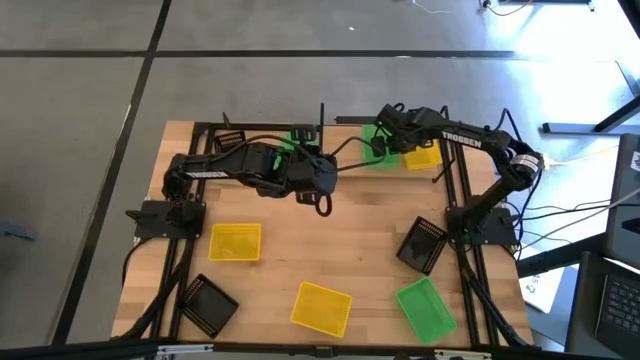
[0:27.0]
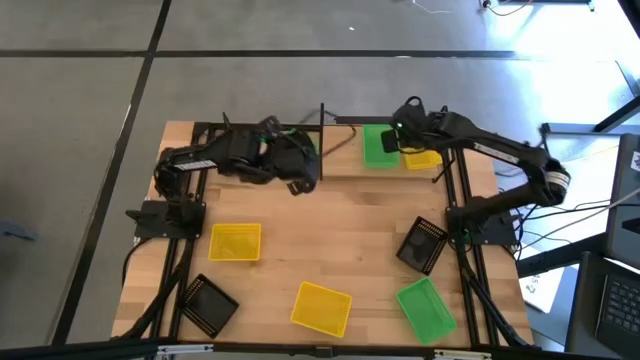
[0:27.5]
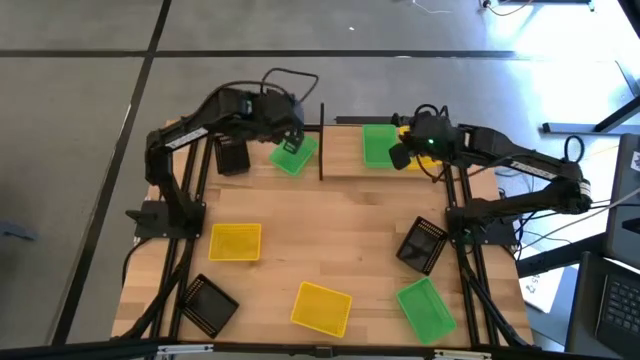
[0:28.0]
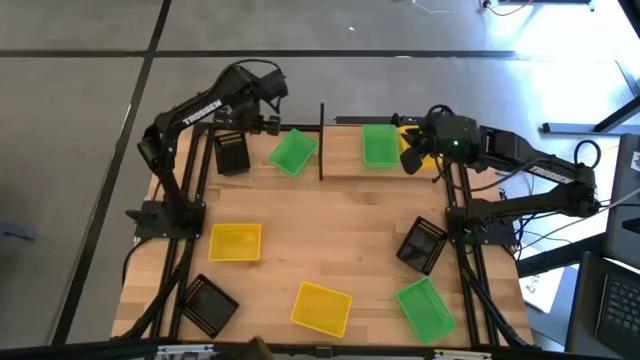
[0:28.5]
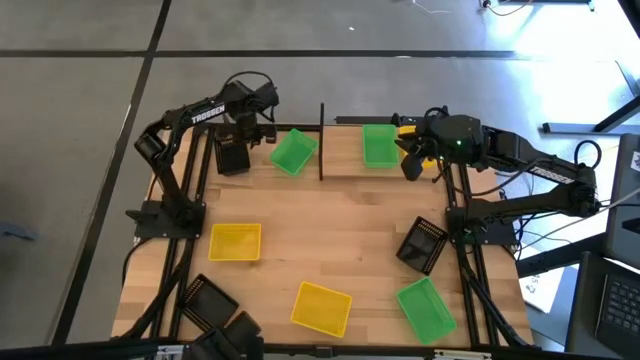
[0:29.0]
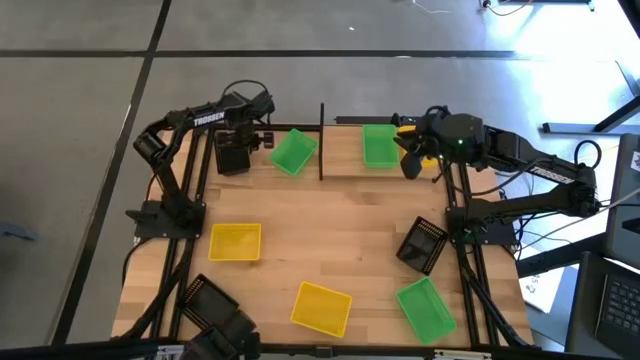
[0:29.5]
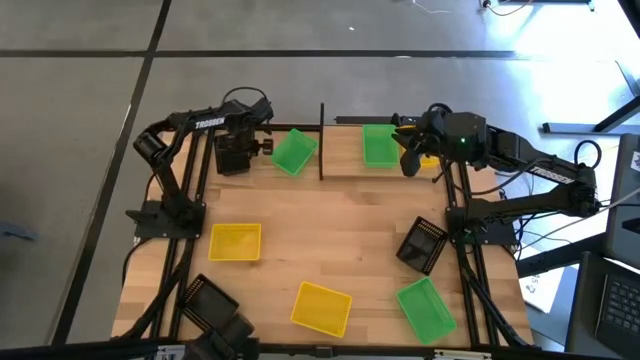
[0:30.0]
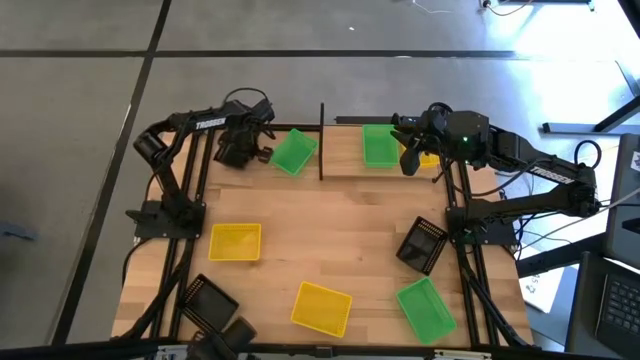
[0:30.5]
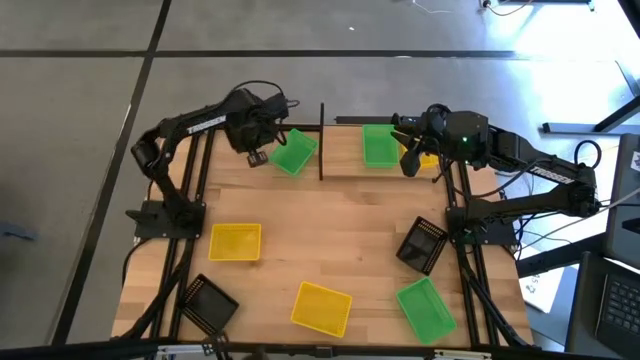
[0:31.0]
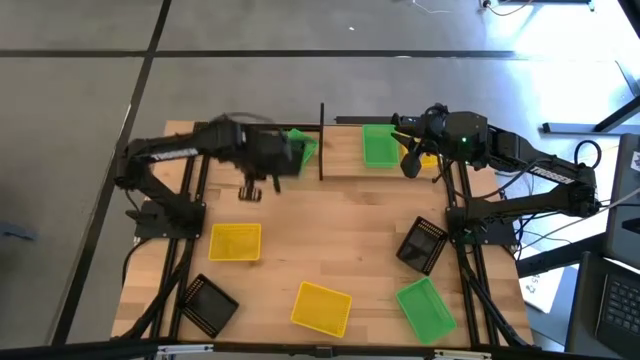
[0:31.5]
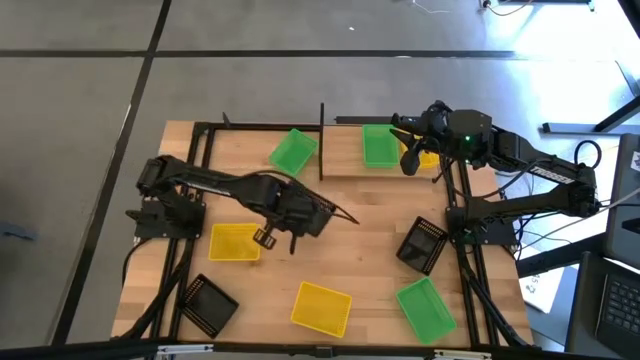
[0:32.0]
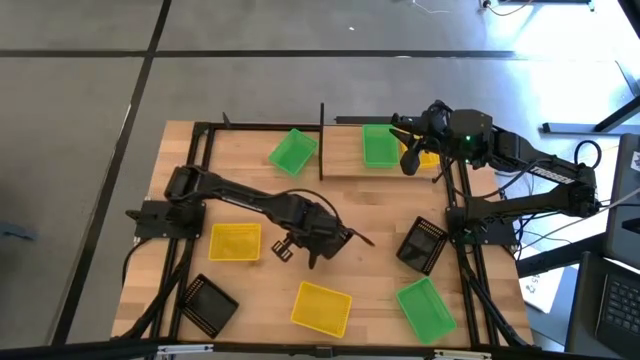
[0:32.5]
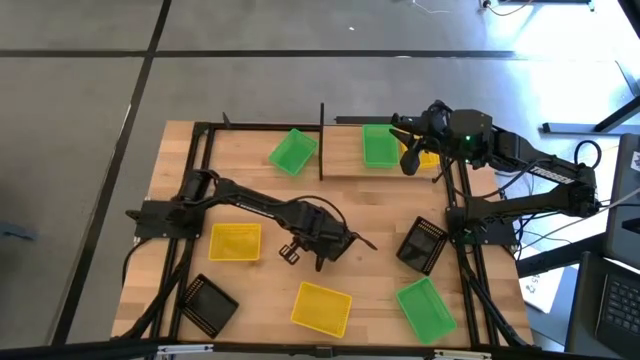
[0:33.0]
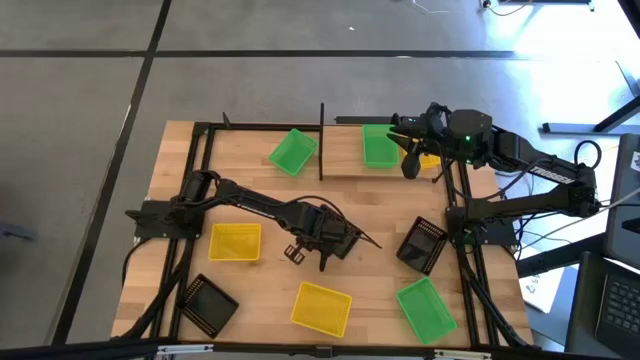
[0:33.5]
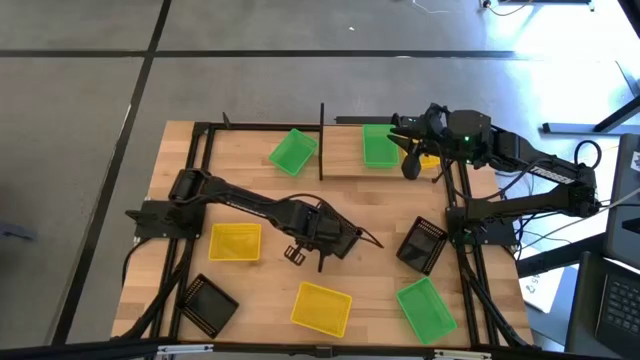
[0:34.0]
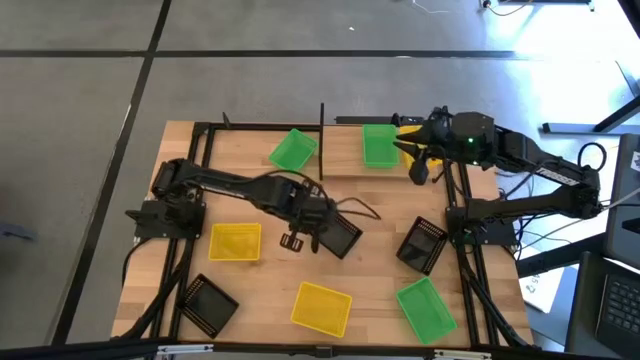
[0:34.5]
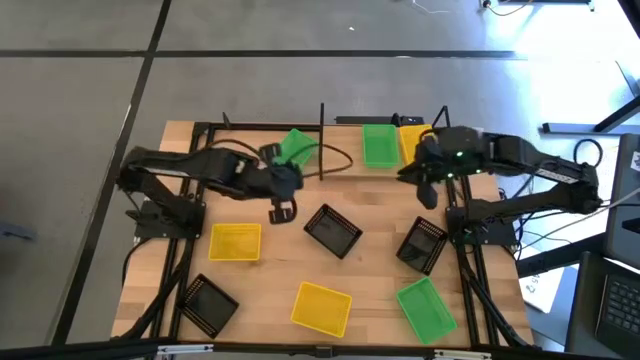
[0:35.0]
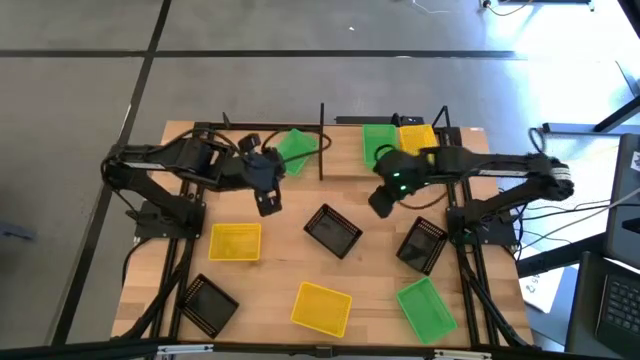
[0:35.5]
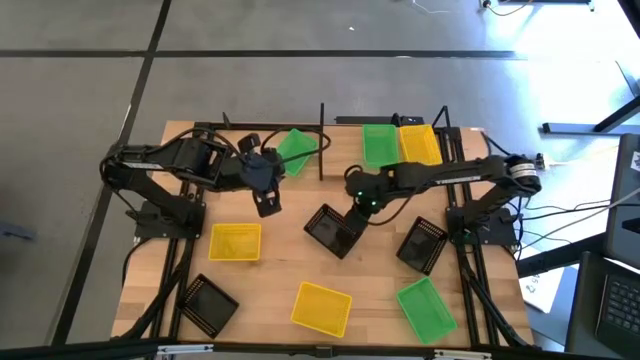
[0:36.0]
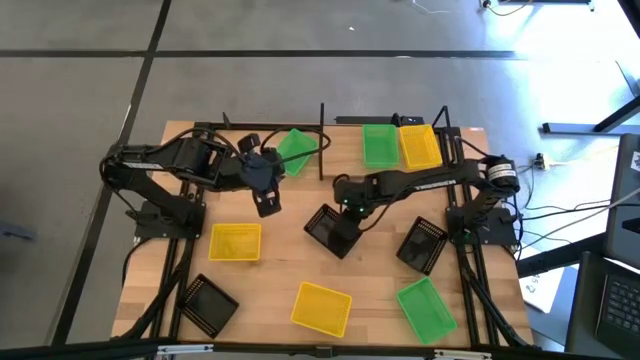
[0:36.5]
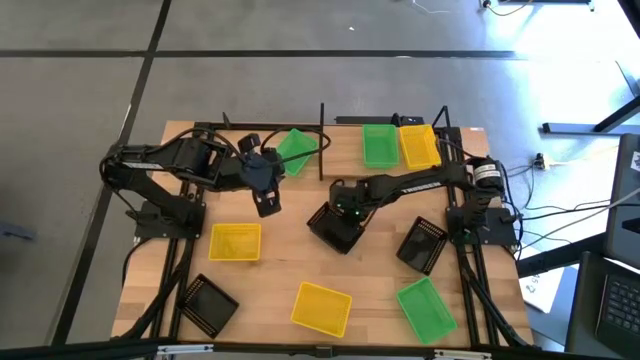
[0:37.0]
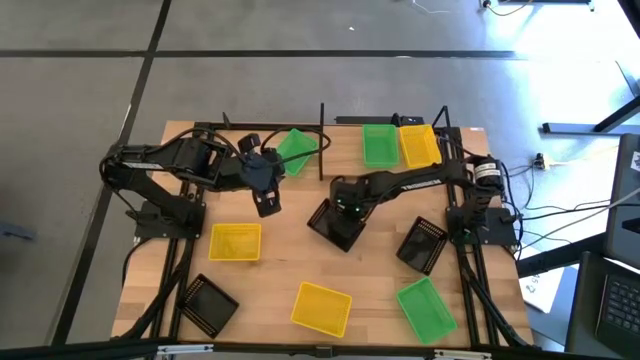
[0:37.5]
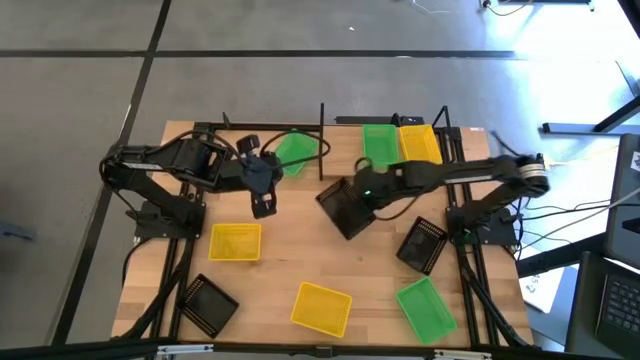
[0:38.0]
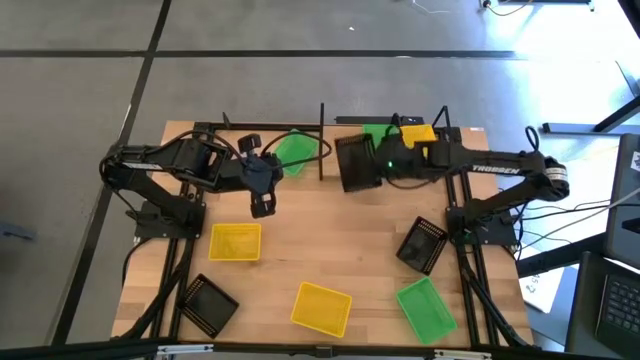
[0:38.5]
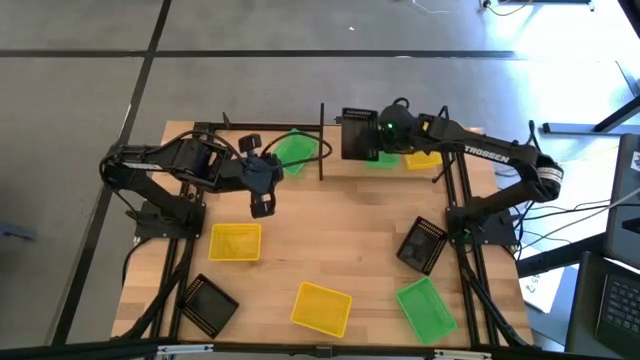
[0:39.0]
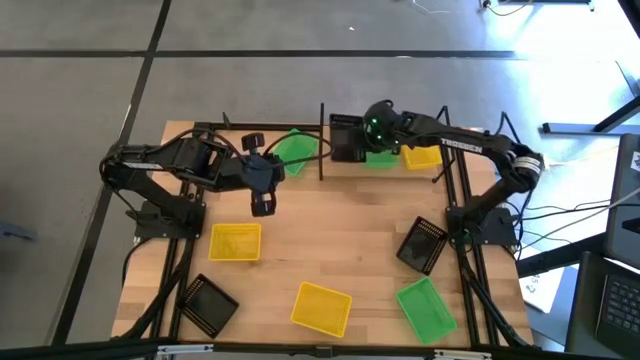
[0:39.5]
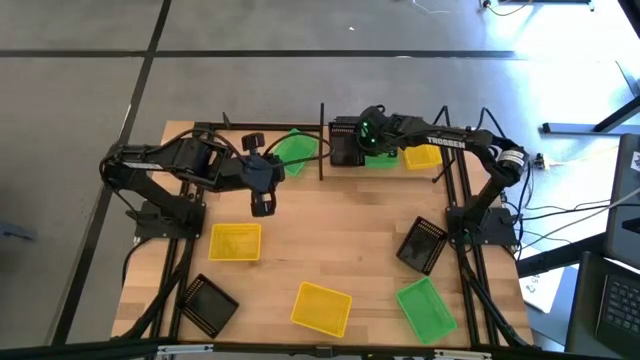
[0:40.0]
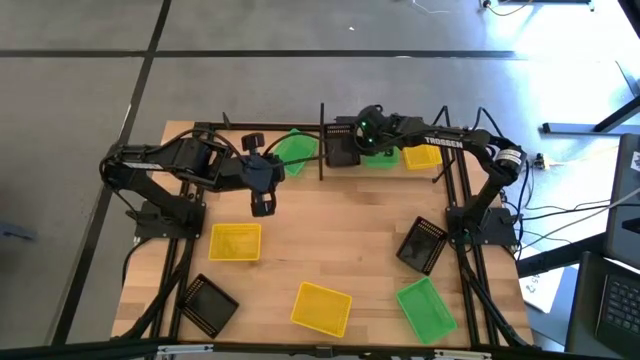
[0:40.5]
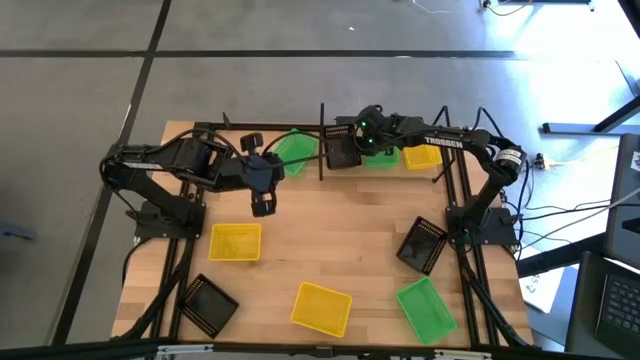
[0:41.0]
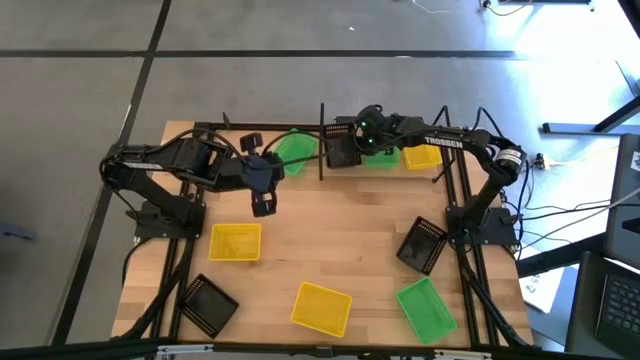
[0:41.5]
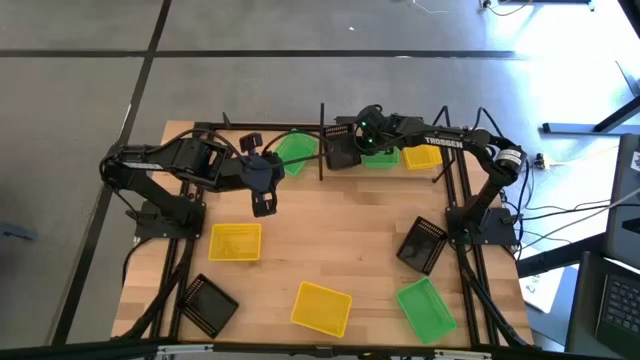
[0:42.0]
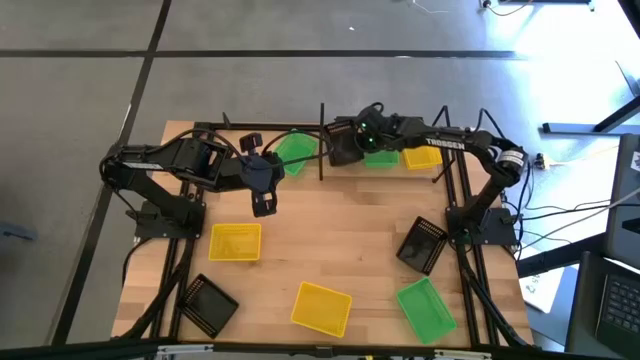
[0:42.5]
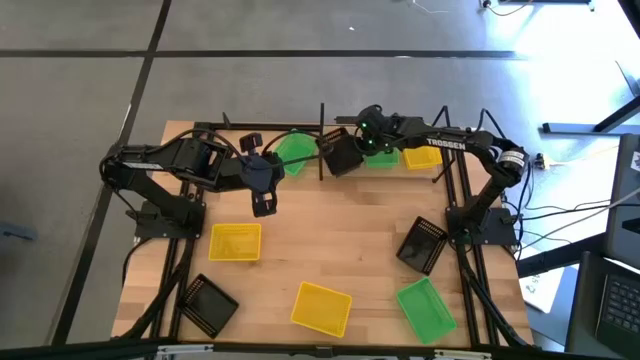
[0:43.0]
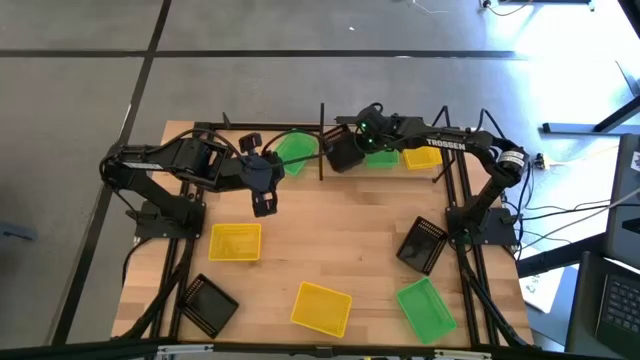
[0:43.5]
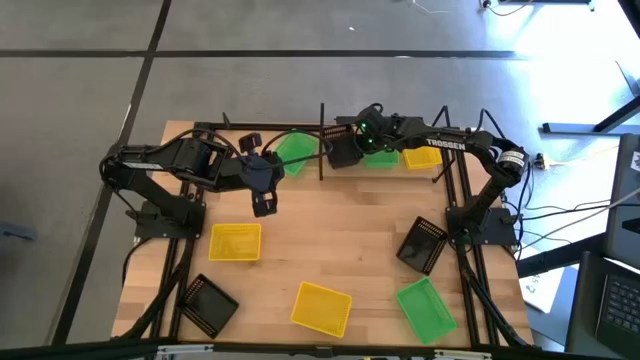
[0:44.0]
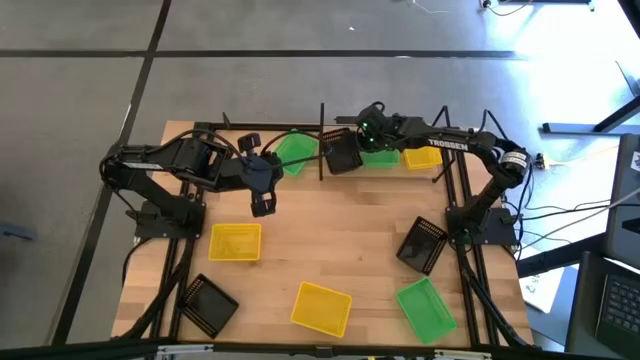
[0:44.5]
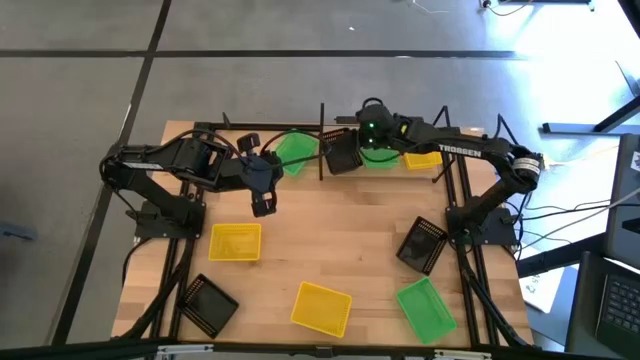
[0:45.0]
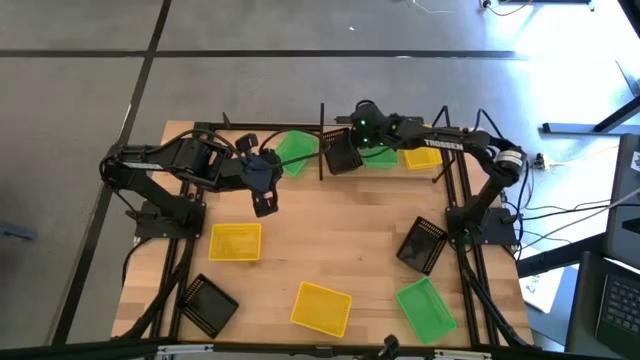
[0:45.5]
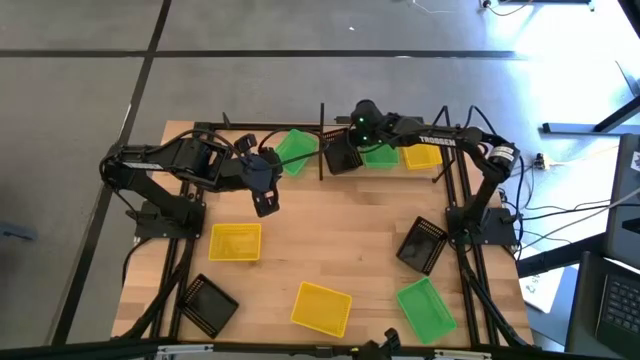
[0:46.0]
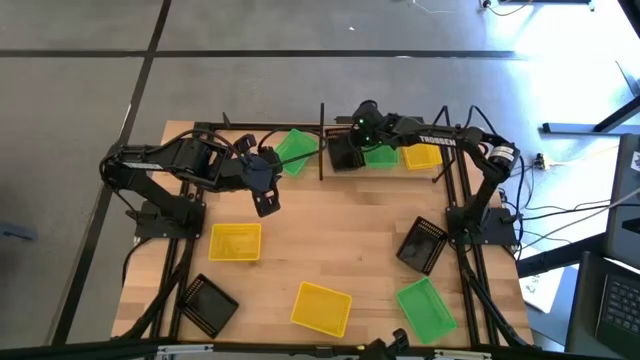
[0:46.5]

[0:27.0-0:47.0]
Task: Stack baskets on shelf by color
Put the top left black basket on the shelf
